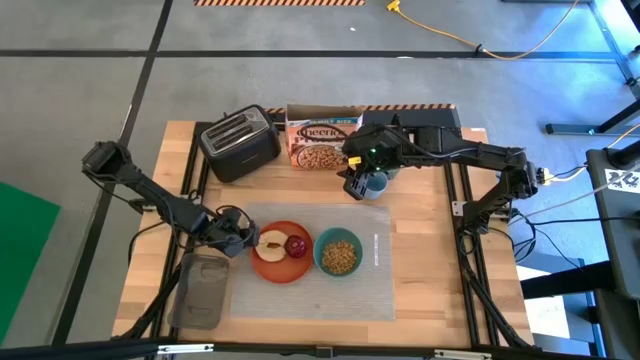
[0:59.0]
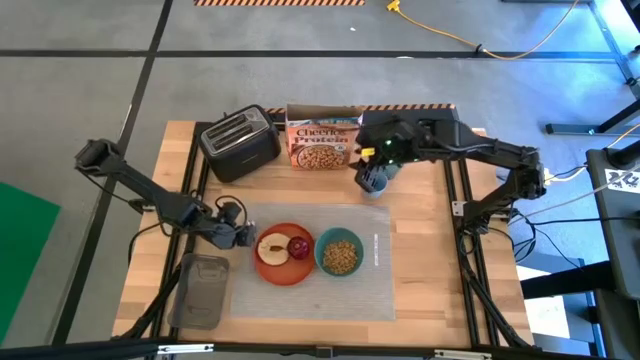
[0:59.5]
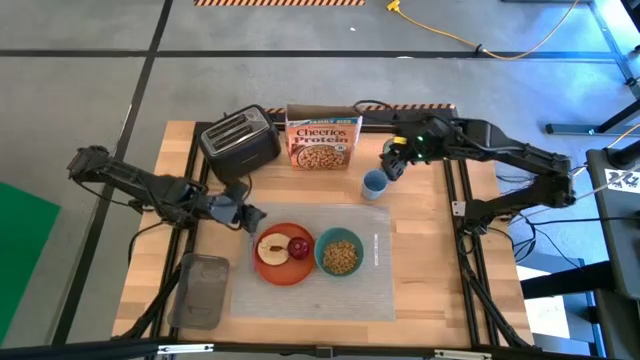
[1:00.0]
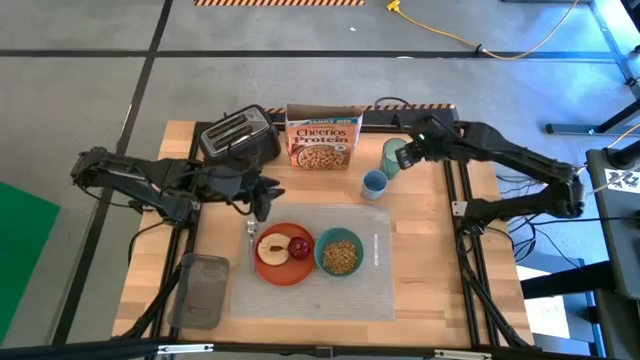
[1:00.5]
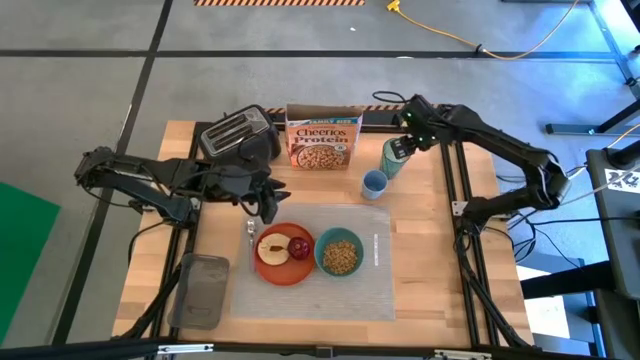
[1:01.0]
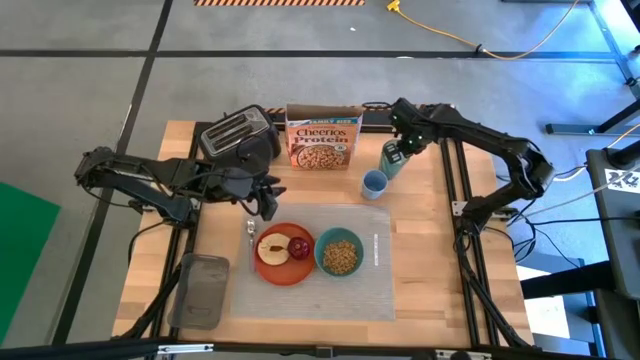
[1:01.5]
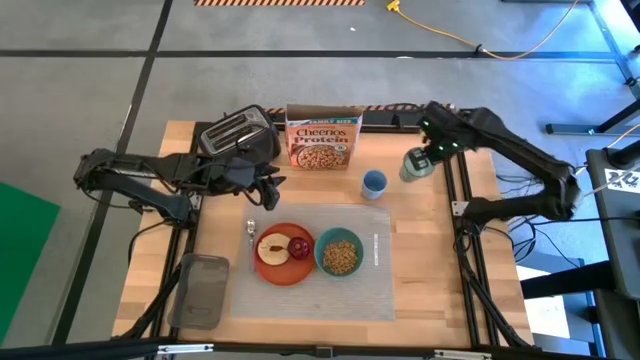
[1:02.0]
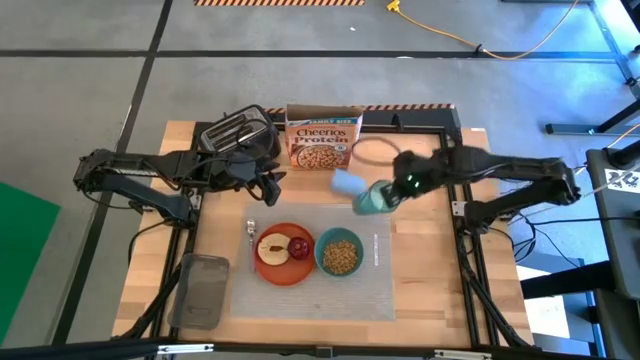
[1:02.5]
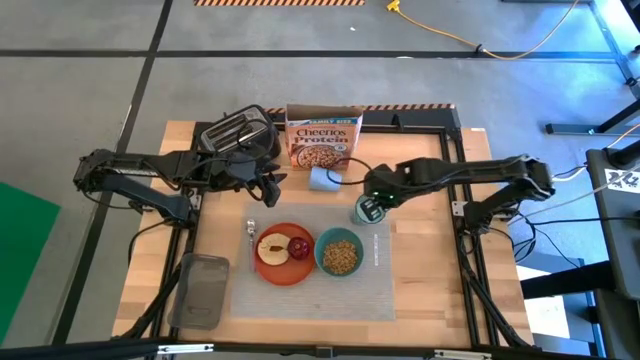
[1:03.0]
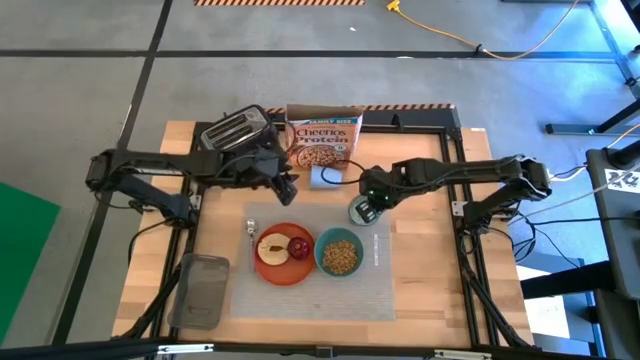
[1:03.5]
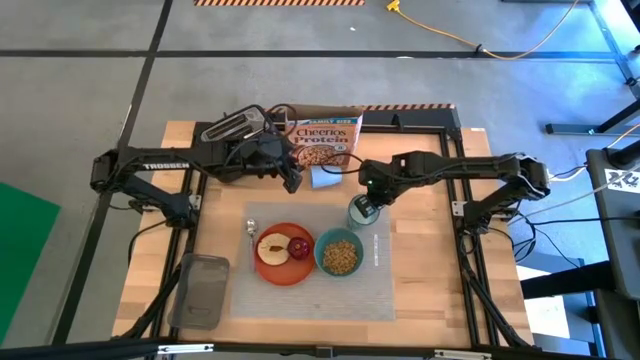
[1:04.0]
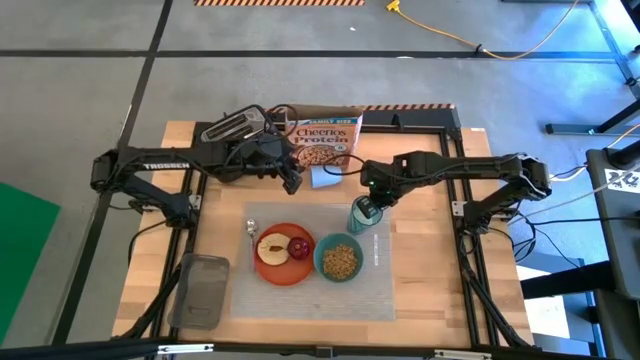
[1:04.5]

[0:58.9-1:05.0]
Task: Arrange a breakfast setting
Put the blue glass of milk on the gray table mat to the top right of the blue bowl

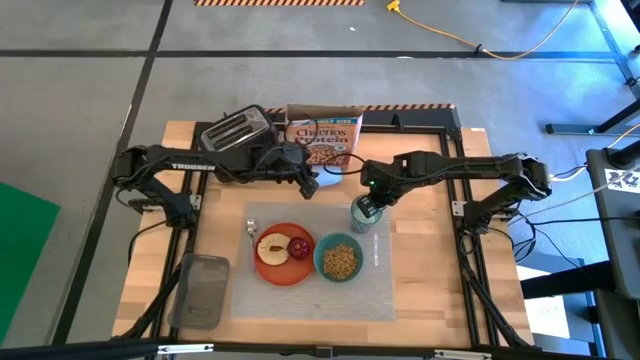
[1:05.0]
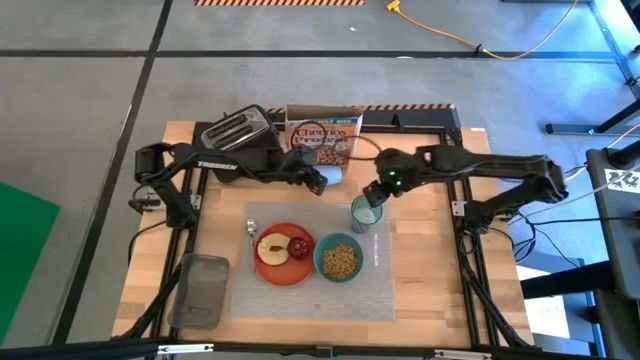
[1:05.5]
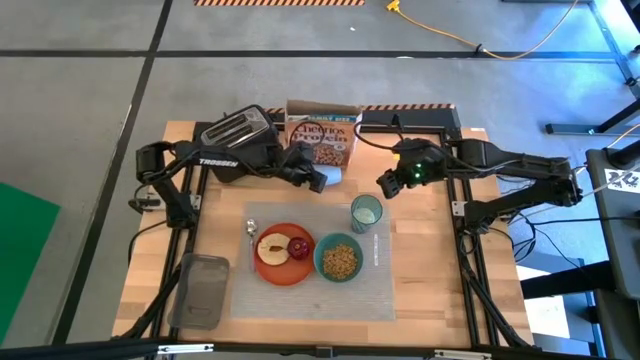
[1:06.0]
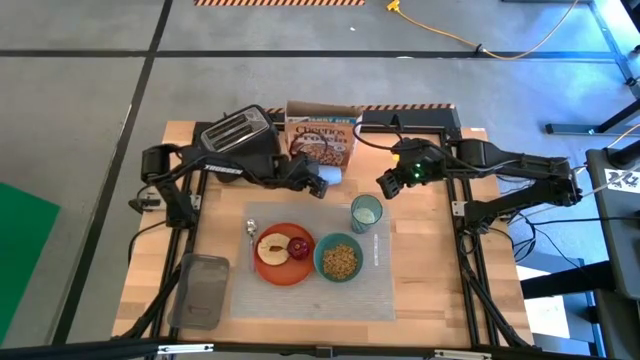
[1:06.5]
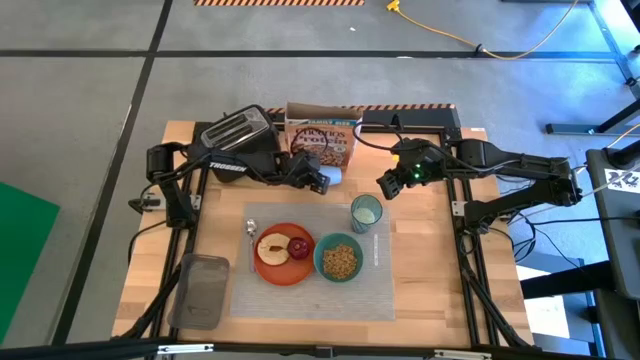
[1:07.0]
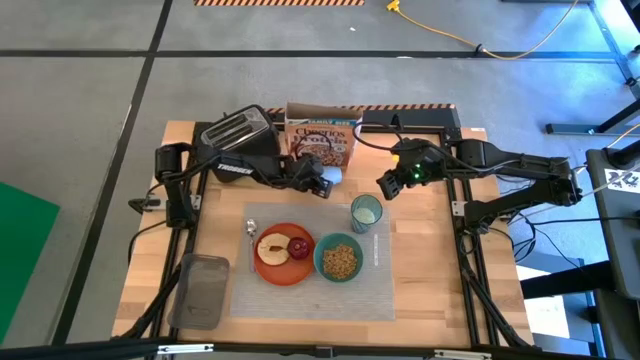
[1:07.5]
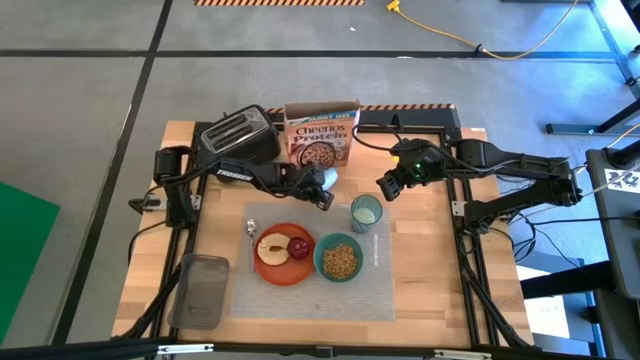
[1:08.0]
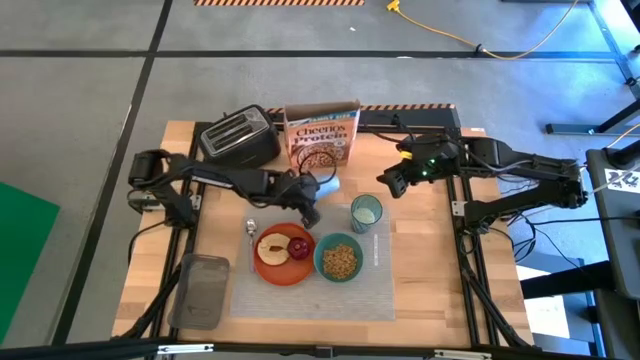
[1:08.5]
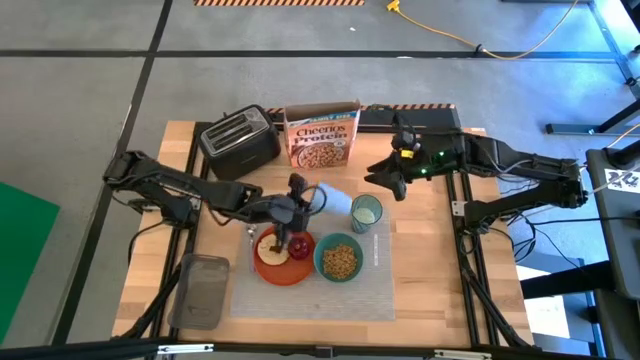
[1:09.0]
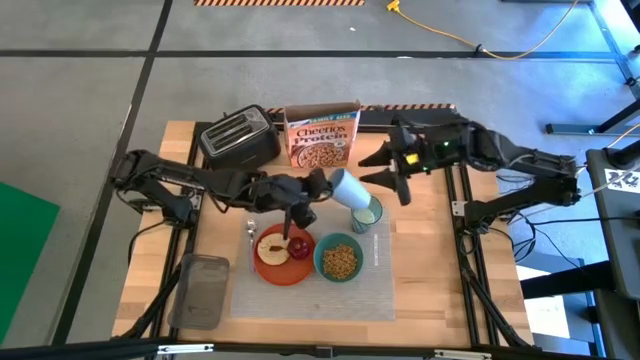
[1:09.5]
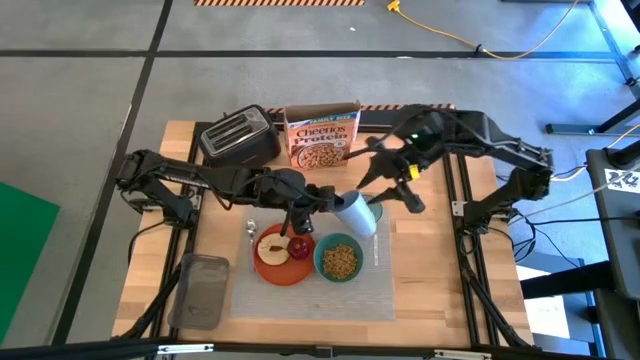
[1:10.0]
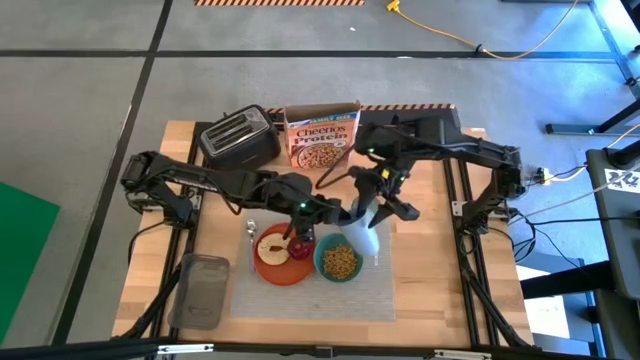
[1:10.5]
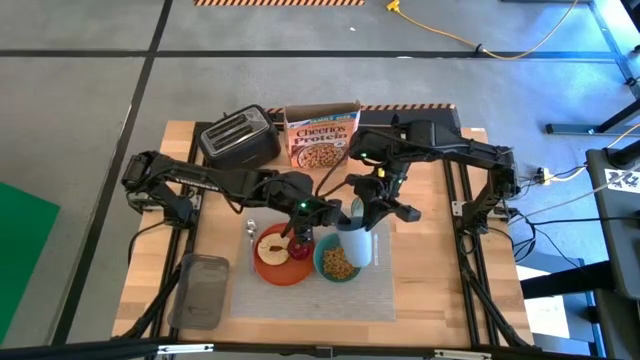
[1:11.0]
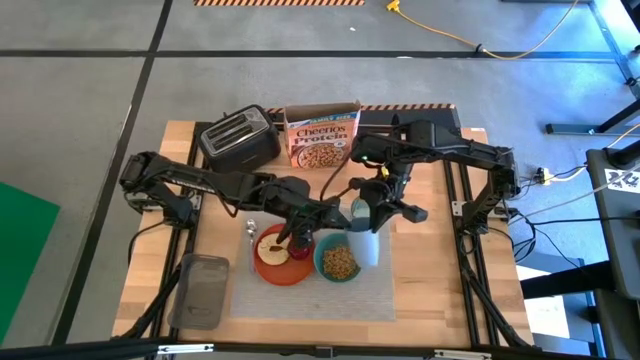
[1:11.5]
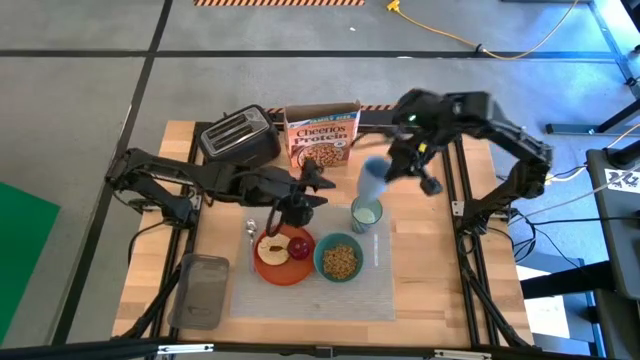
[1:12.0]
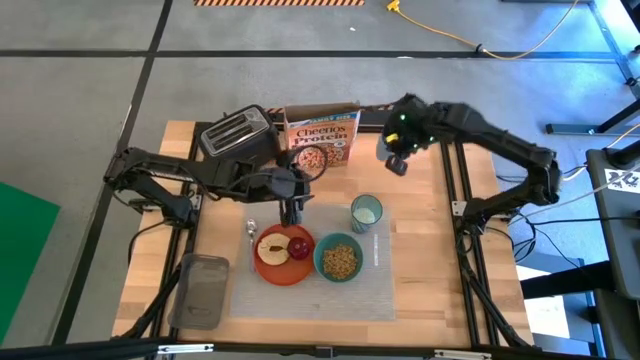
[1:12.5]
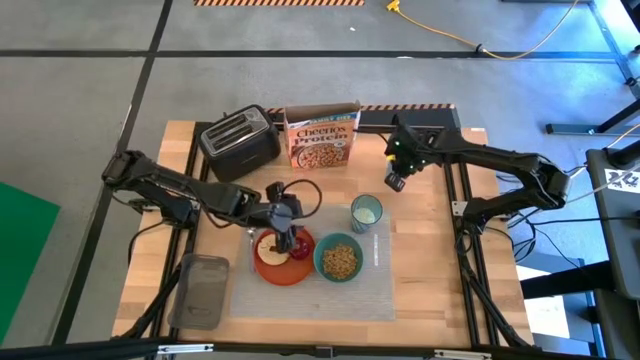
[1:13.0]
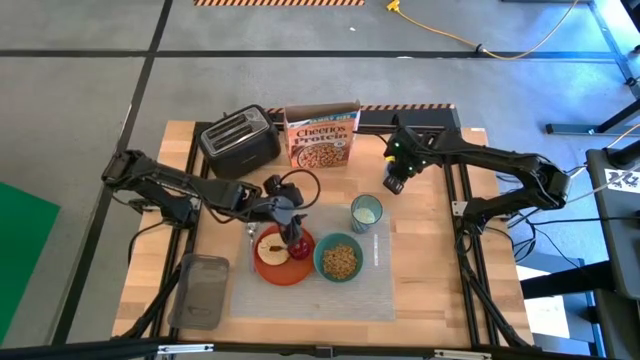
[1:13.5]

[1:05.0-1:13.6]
Move the blue cup to the top right of the table

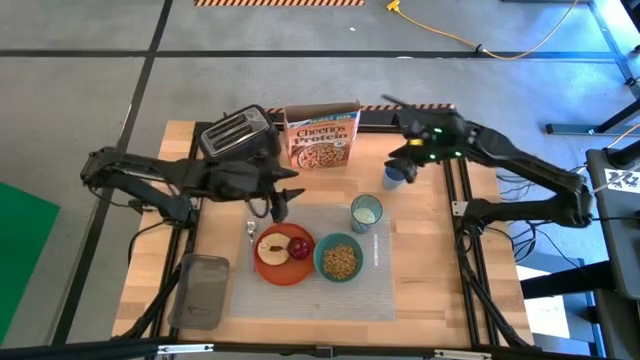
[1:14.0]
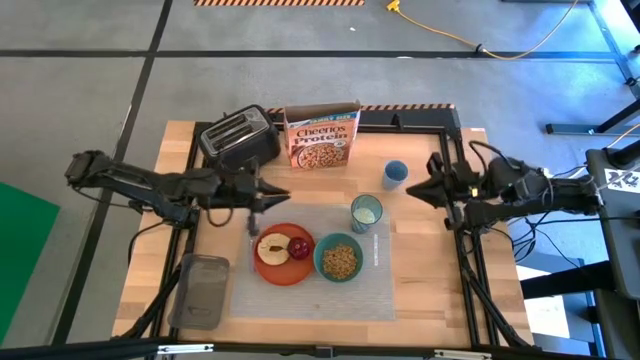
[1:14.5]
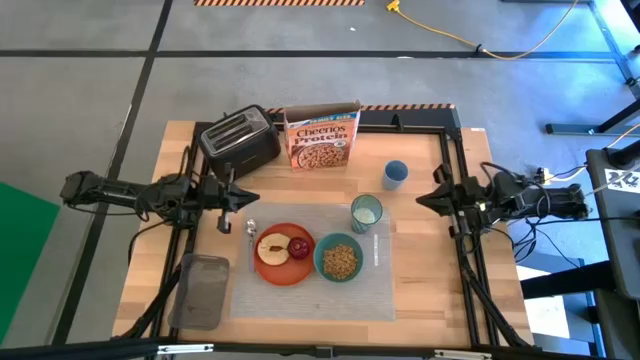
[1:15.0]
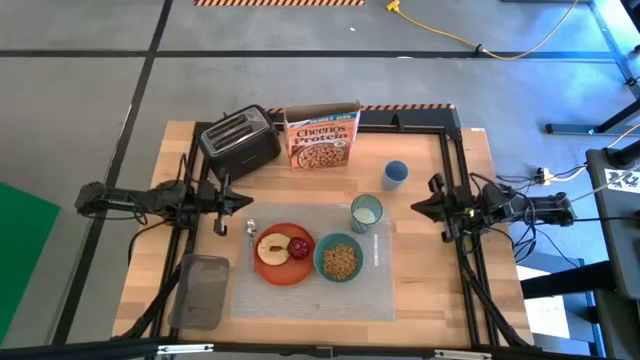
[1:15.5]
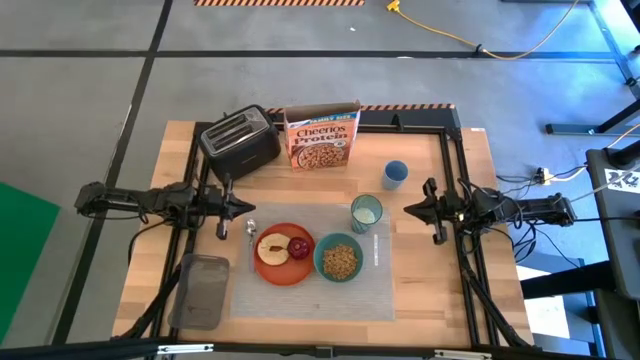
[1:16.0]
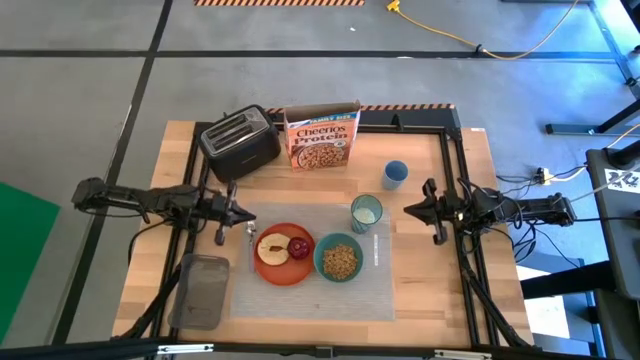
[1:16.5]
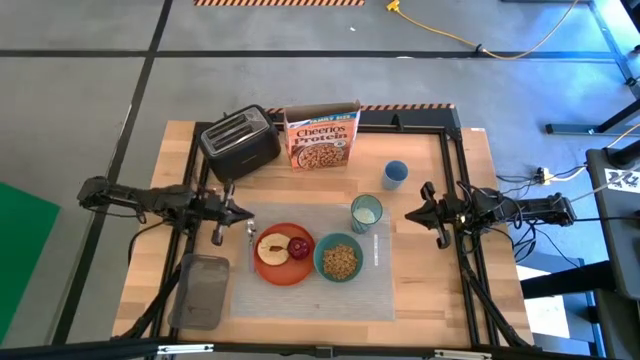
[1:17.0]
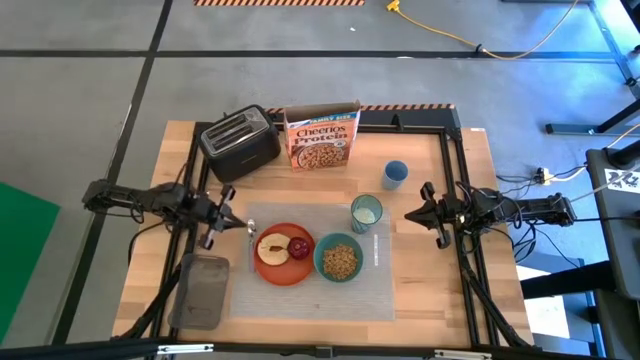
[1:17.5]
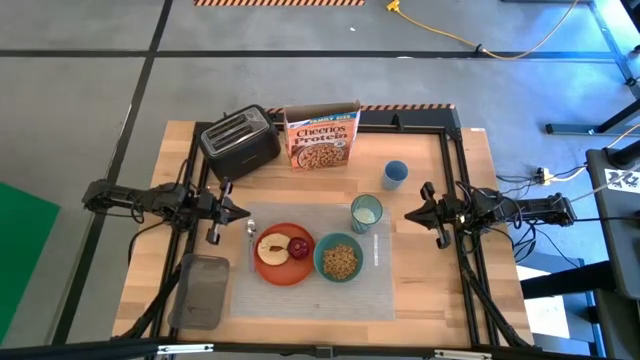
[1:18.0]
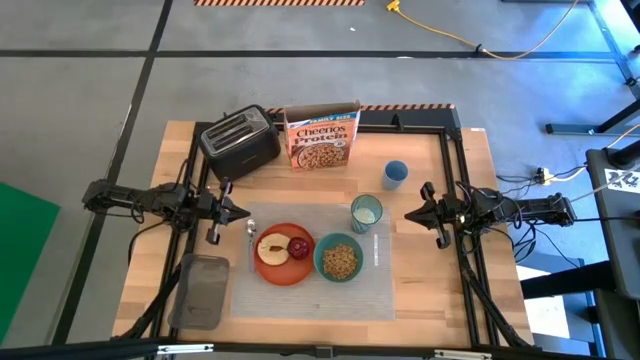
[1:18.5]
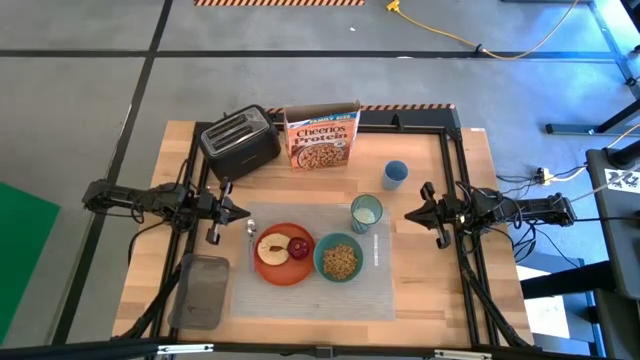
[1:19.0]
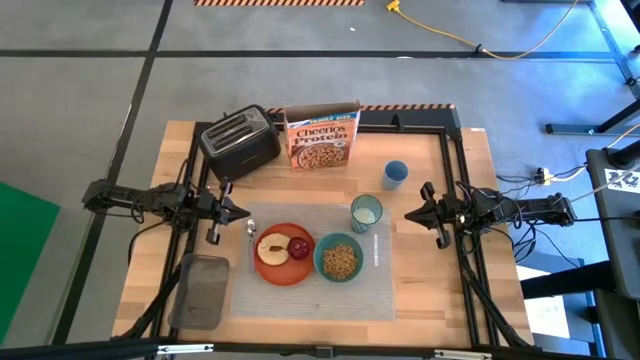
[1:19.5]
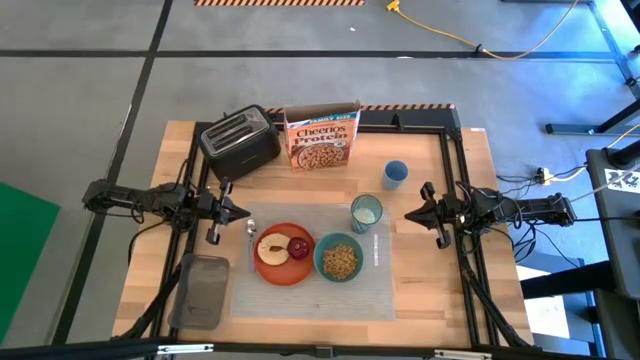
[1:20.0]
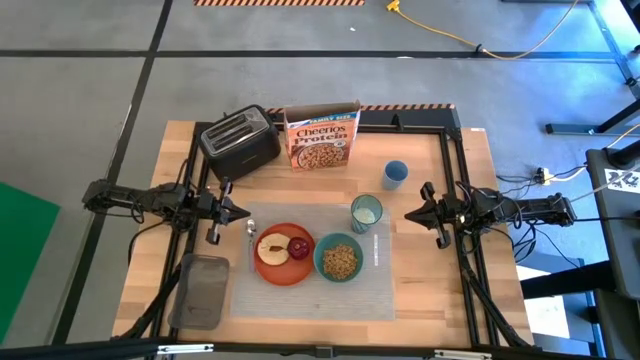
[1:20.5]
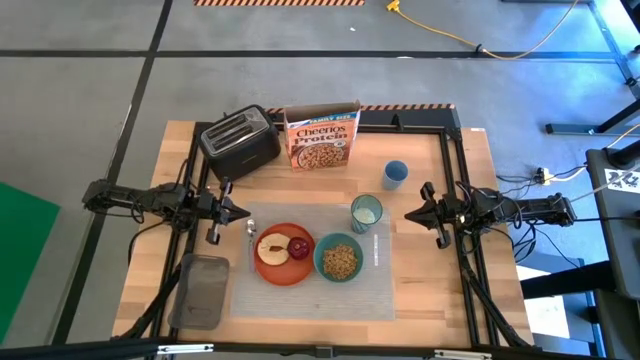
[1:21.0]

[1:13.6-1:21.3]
Return to Home Position
